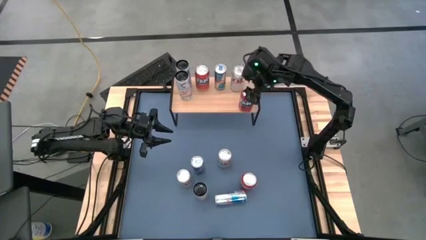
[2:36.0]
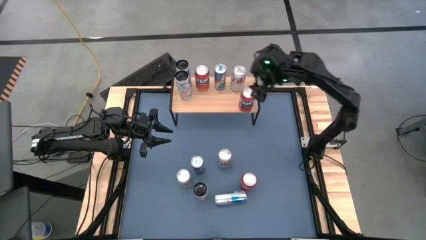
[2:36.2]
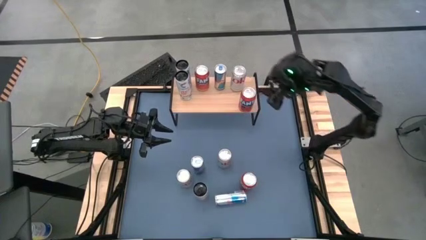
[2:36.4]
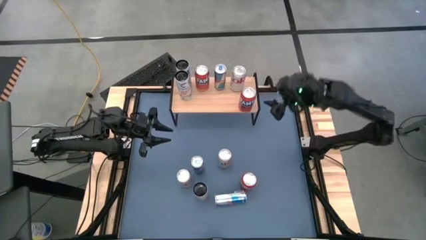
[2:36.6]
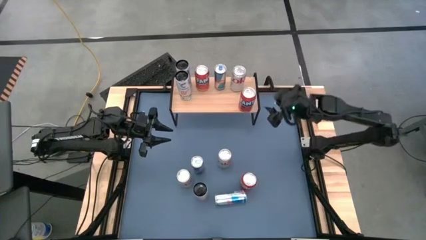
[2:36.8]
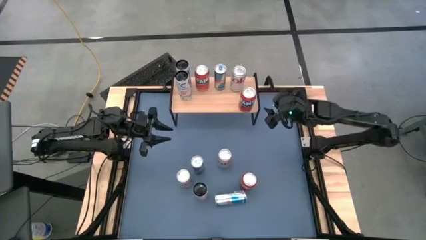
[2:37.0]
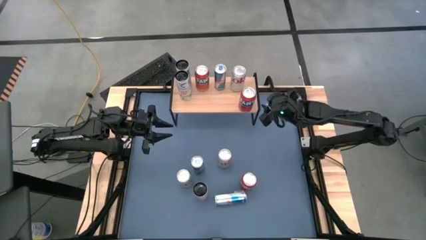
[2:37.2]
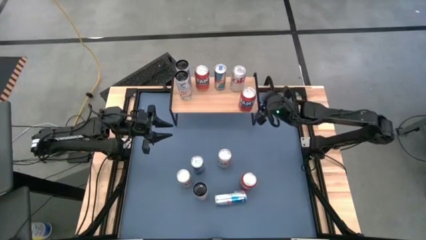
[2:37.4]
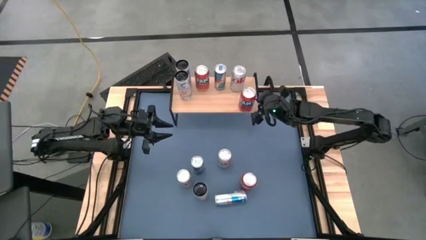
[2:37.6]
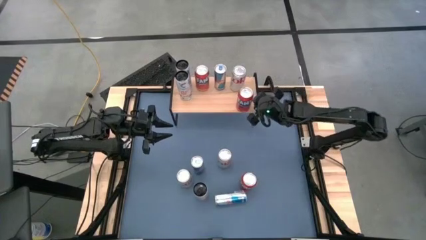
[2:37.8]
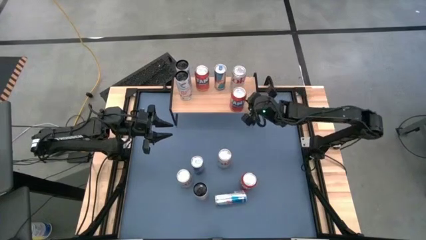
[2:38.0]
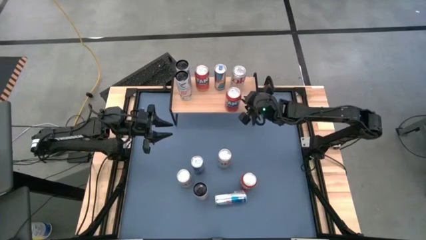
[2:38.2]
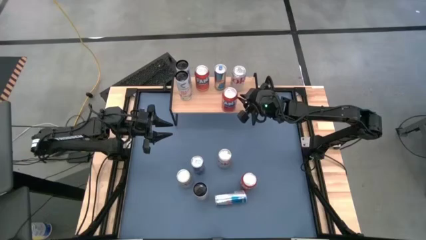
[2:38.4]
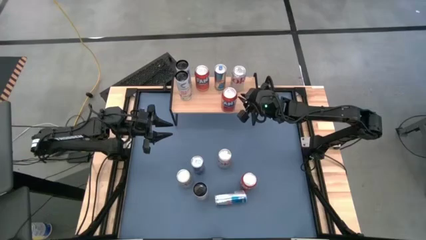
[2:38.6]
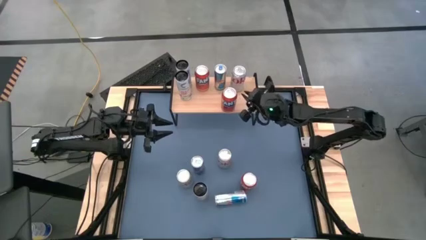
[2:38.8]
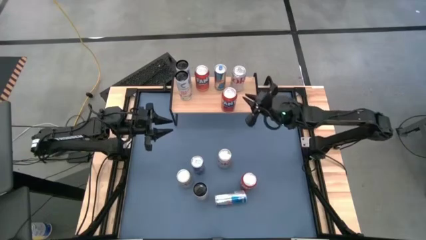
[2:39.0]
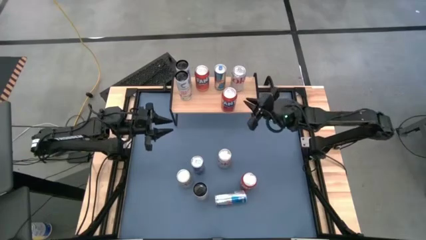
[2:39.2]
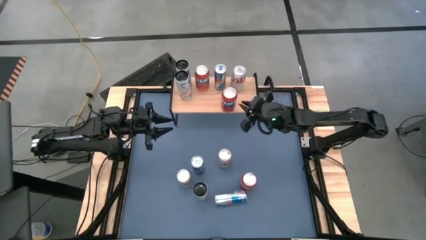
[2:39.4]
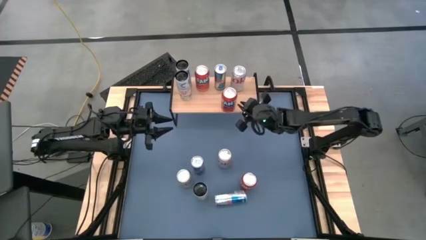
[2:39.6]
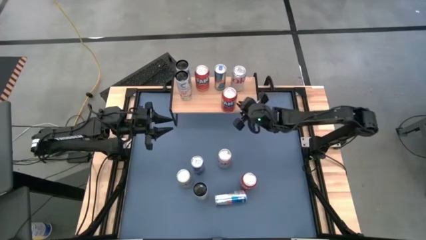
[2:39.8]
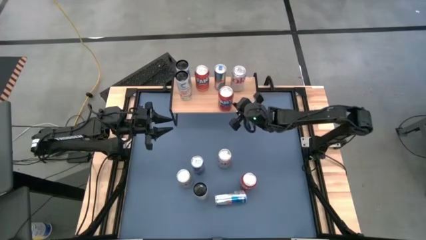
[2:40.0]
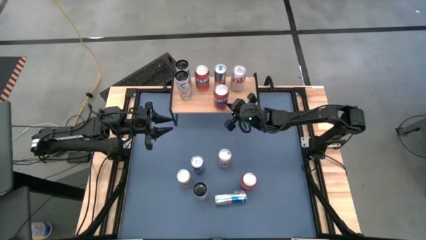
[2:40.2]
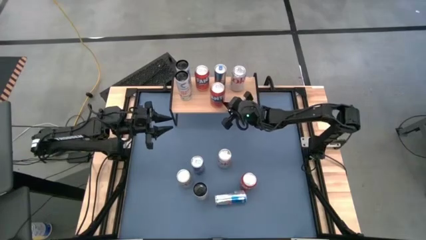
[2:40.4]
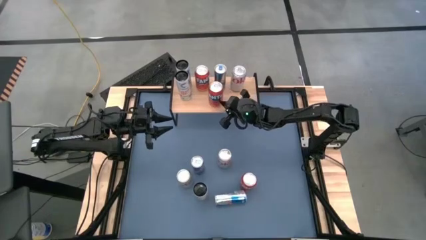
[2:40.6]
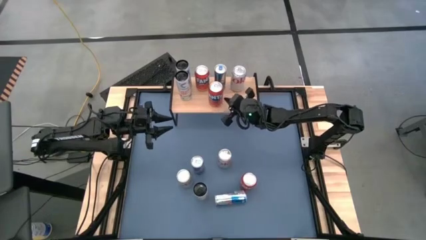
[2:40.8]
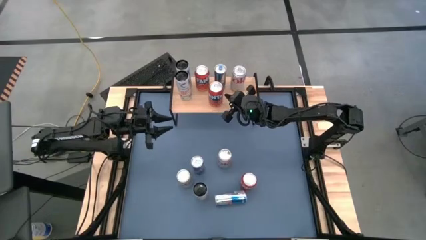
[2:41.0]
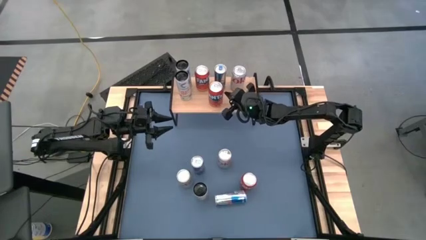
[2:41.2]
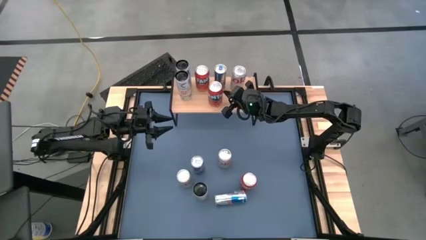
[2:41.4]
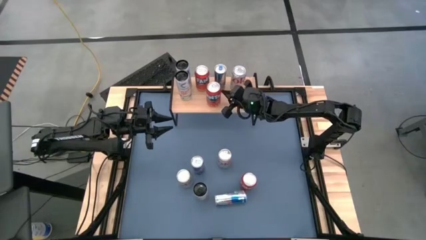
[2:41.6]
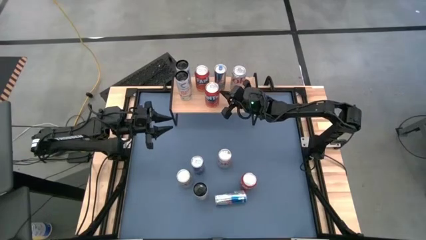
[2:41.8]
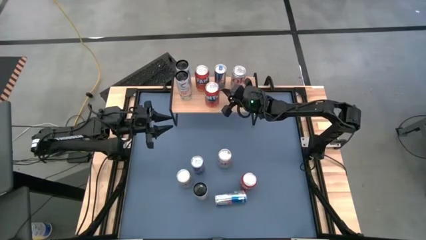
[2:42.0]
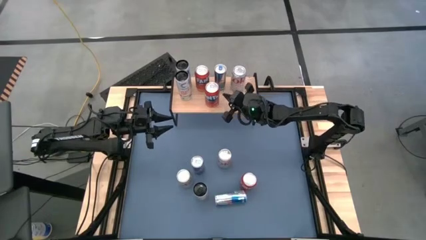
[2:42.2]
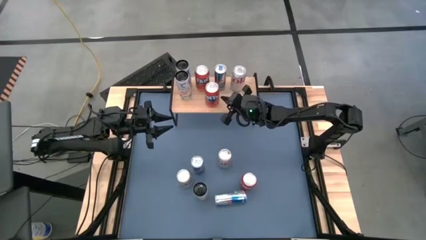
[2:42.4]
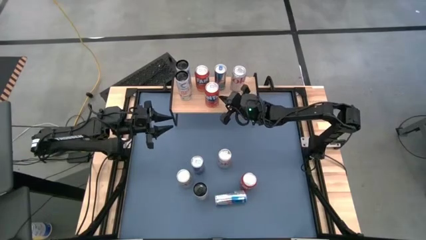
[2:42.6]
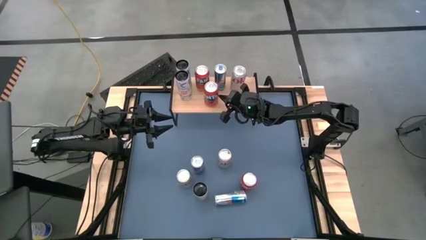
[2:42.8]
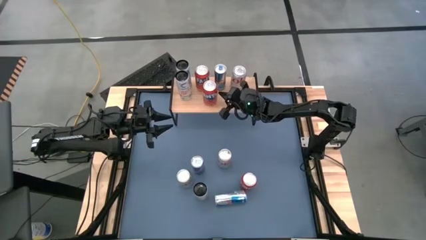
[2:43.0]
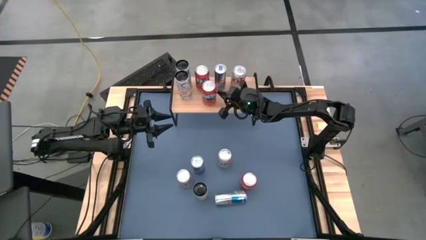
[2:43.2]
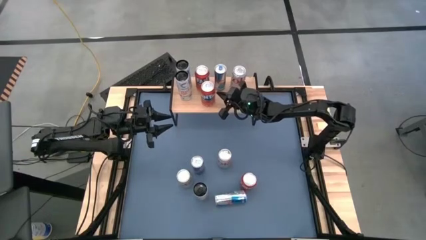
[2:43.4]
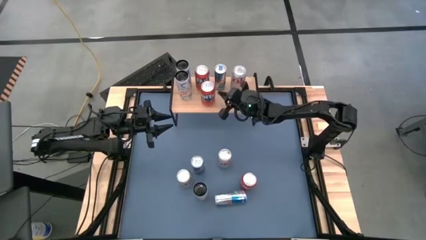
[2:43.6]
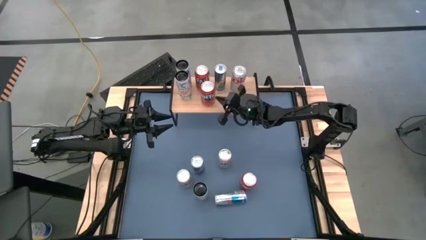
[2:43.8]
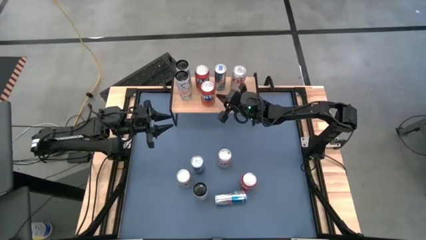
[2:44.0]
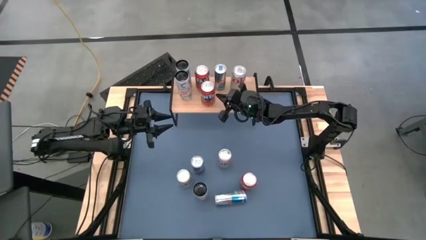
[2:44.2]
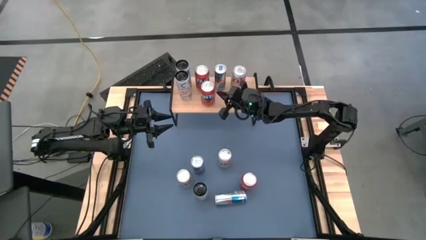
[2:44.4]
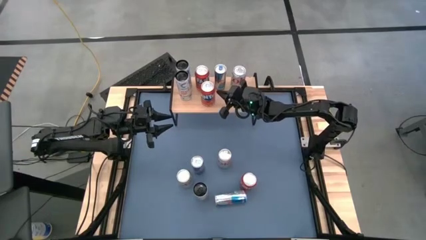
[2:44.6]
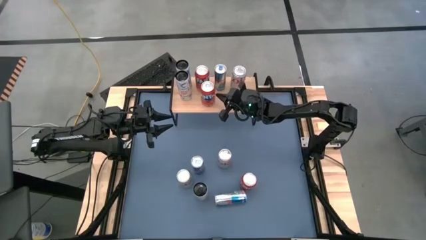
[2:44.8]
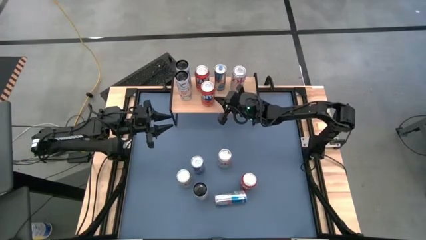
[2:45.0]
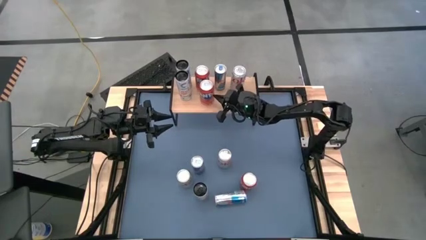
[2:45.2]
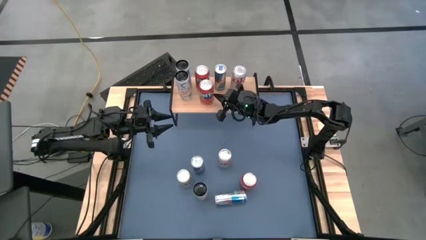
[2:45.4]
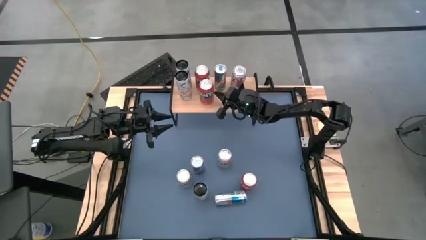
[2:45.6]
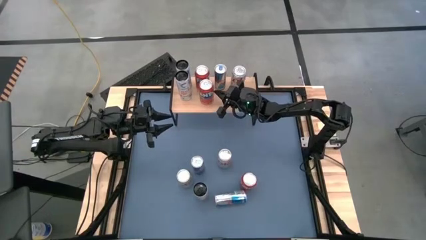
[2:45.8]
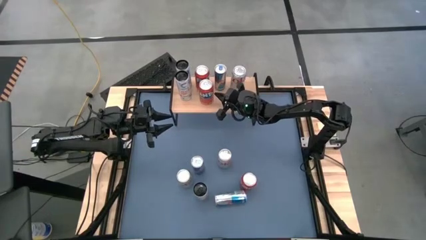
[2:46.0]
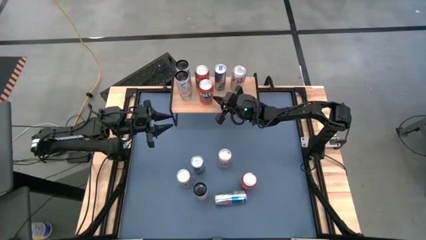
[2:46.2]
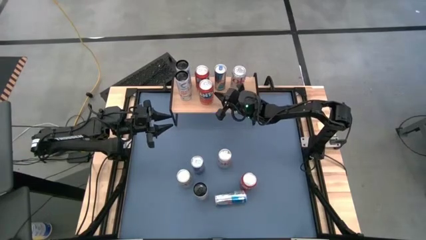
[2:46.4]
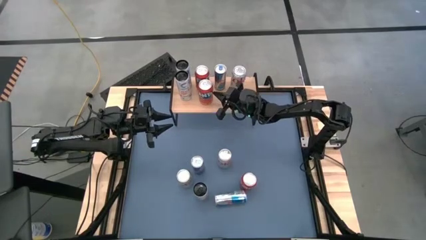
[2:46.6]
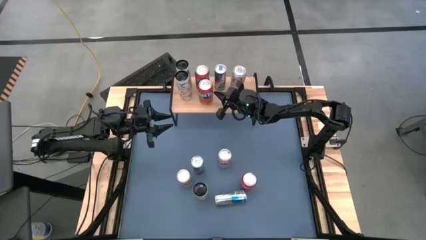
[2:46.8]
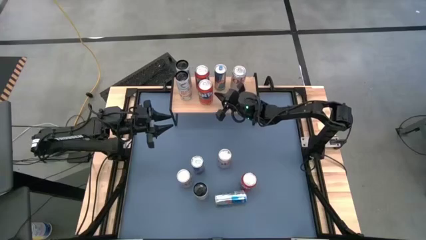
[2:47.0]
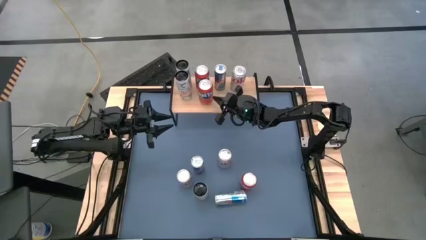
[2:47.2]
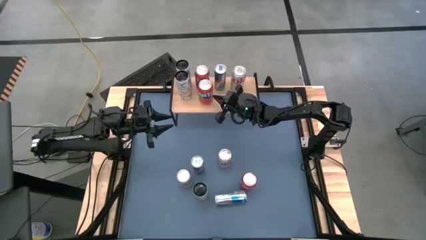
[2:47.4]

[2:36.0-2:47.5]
Task: Place canned beverage on shelf
Adjust the orange soda can

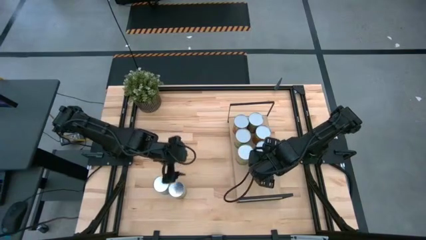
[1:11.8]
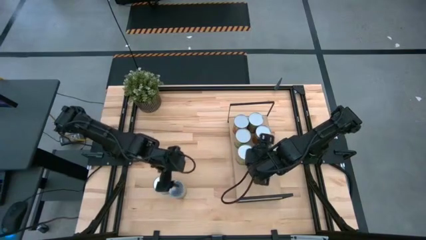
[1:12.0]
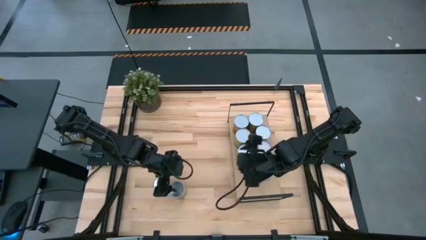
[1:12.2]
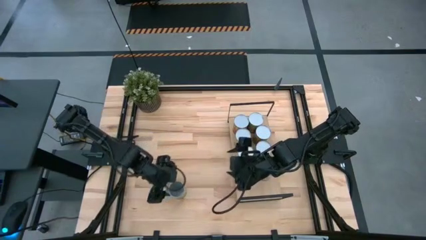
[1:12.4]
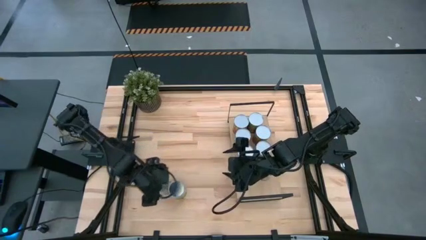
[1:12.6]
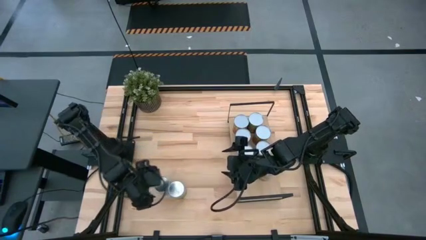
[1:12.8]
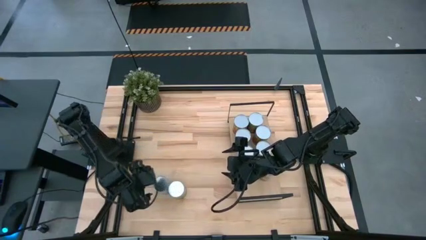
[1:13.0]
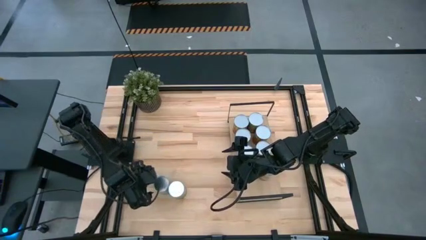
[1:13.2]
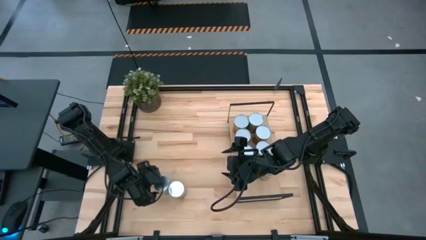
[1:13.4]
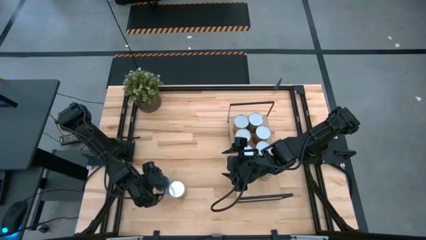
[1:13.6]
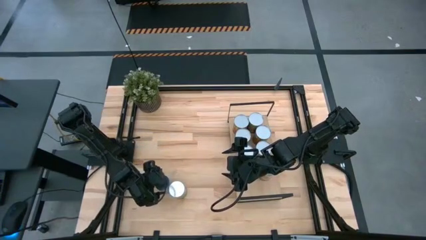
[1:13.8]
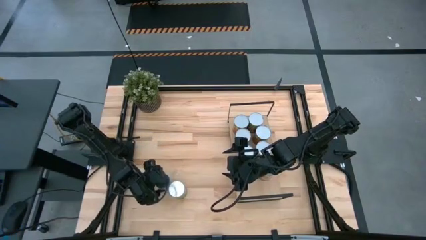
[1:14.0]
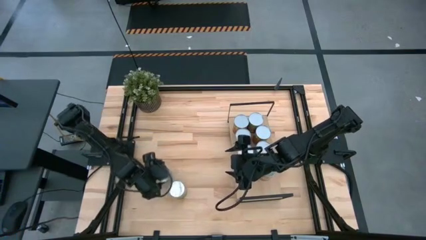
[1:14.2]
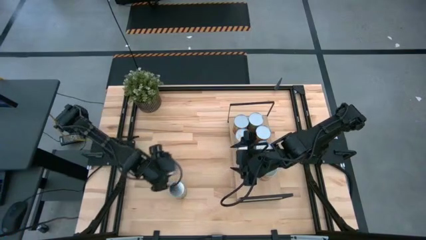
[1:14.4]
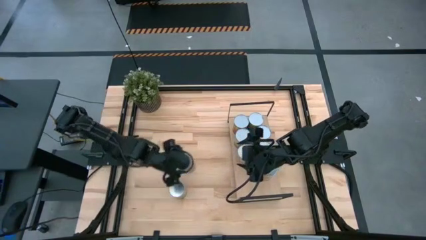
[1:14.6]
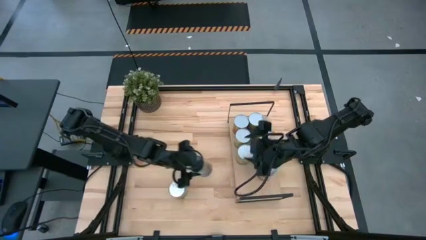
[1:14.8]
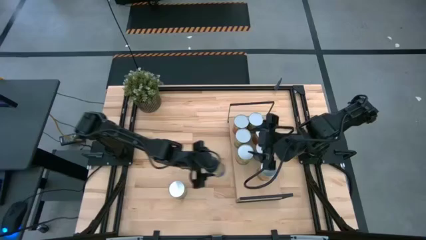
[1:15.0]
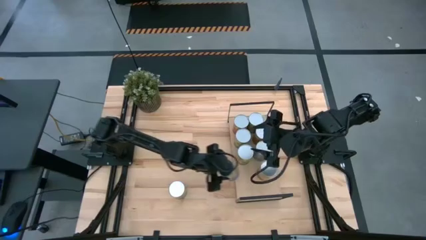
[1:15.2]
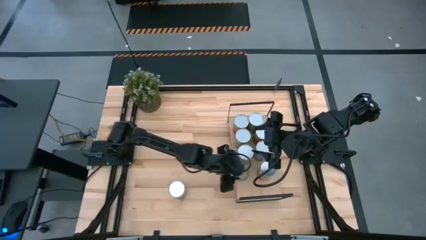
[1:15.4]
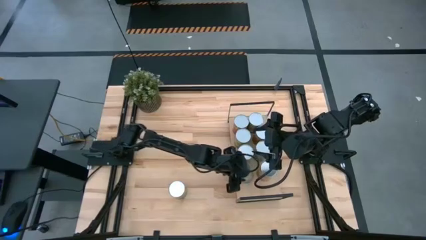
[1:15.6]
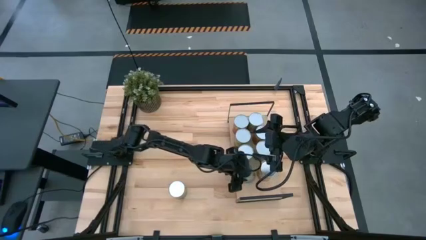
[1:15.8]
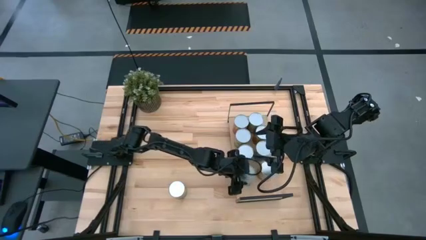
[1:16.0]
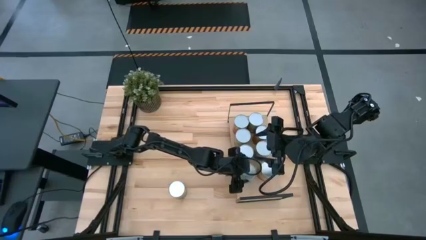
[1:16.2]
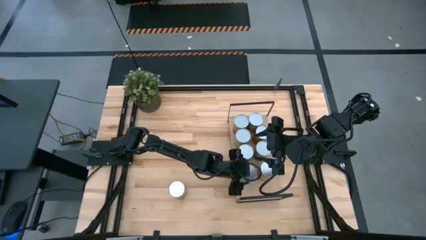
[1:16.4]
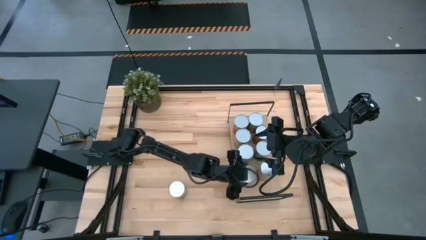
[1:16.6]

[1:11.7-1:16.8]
Task: Pick and place cans onto a shelf
Put the canned tomatoes on the shelf
